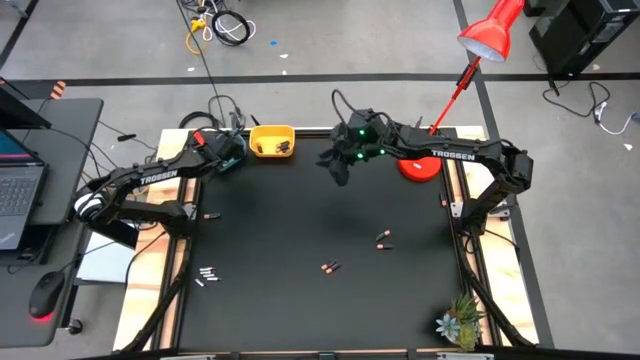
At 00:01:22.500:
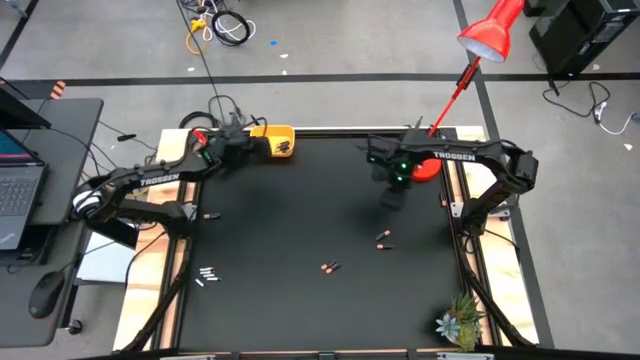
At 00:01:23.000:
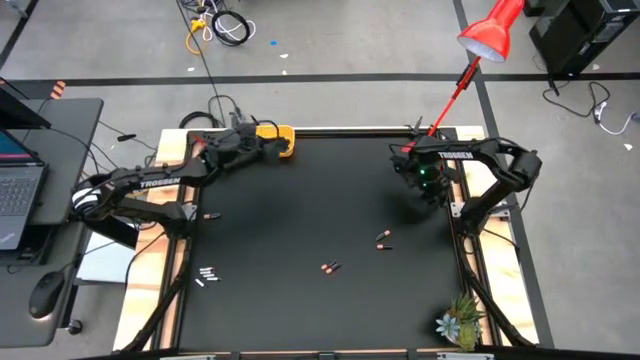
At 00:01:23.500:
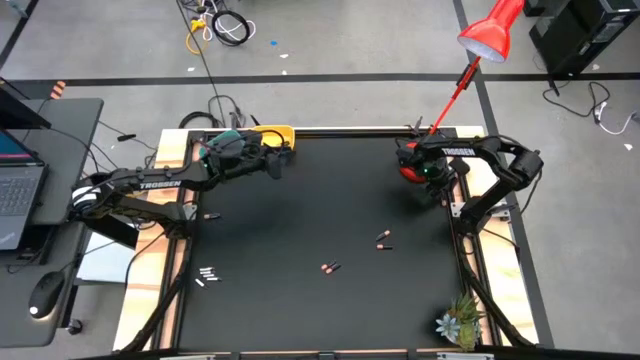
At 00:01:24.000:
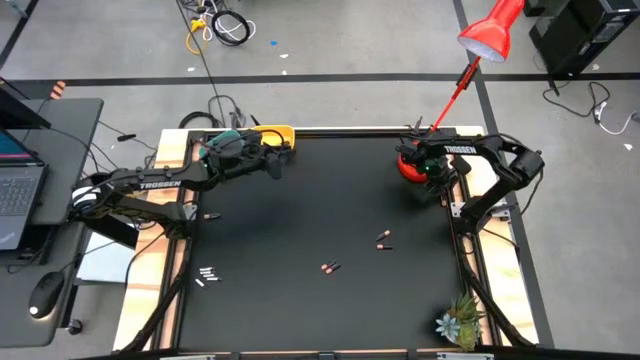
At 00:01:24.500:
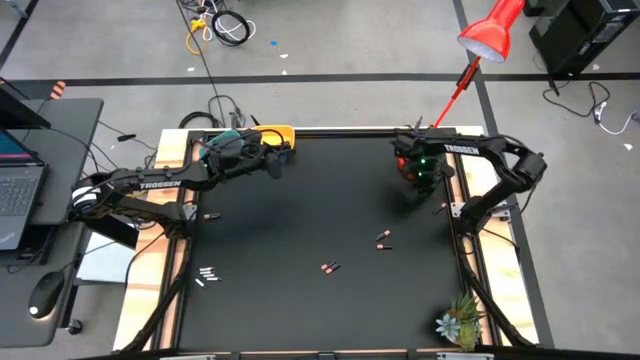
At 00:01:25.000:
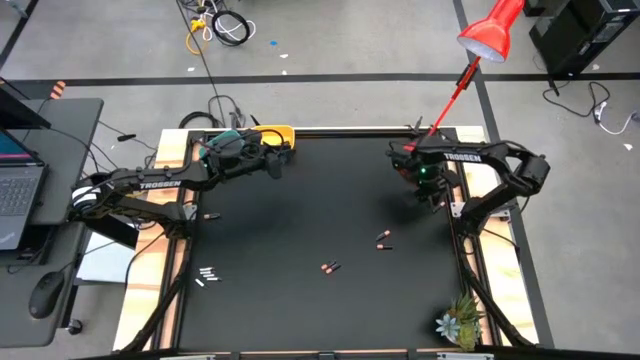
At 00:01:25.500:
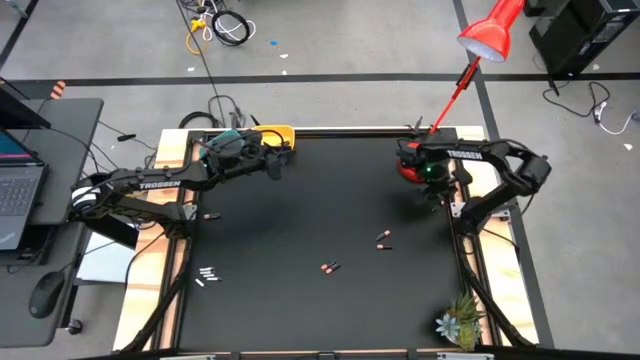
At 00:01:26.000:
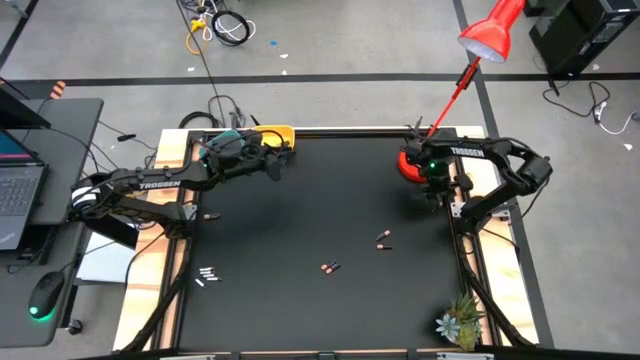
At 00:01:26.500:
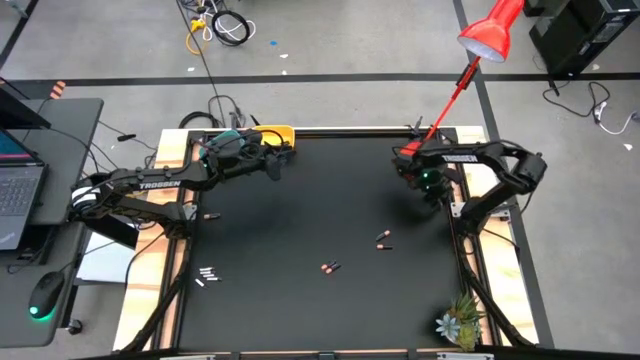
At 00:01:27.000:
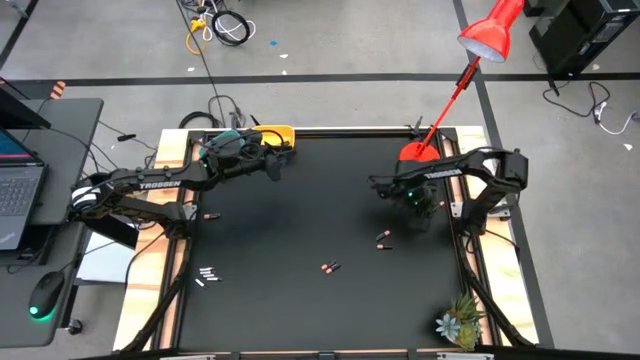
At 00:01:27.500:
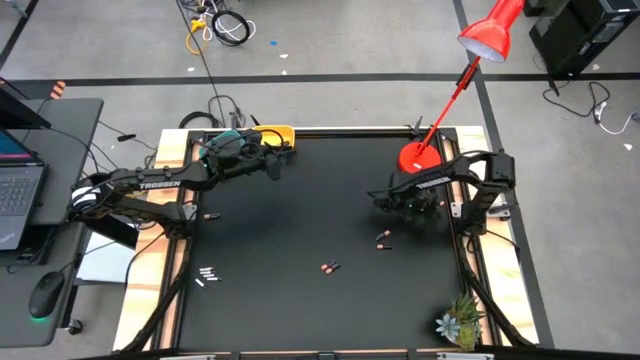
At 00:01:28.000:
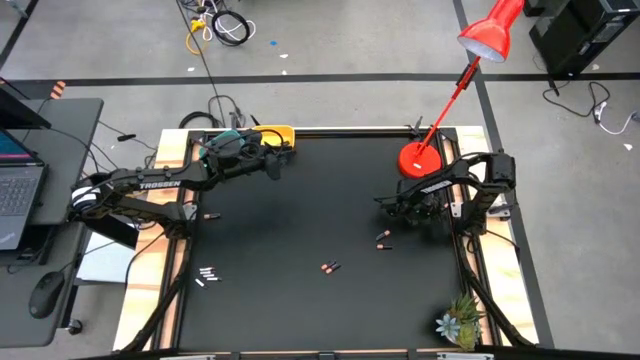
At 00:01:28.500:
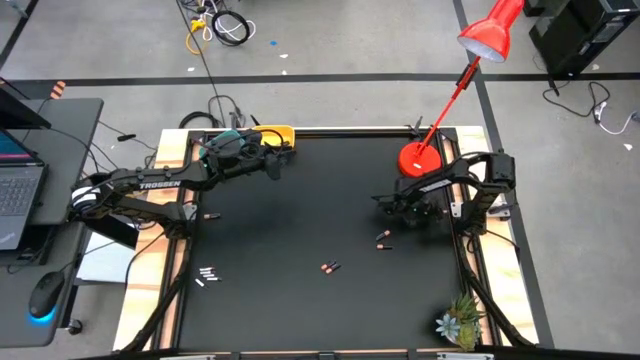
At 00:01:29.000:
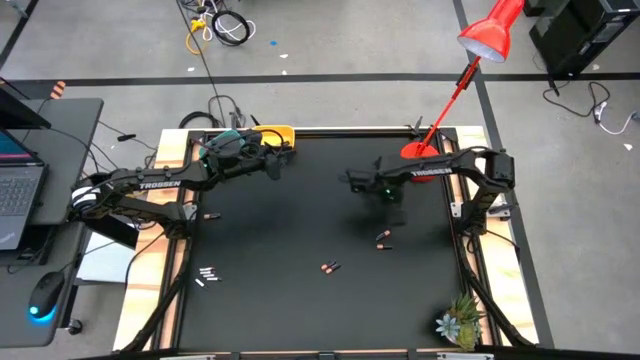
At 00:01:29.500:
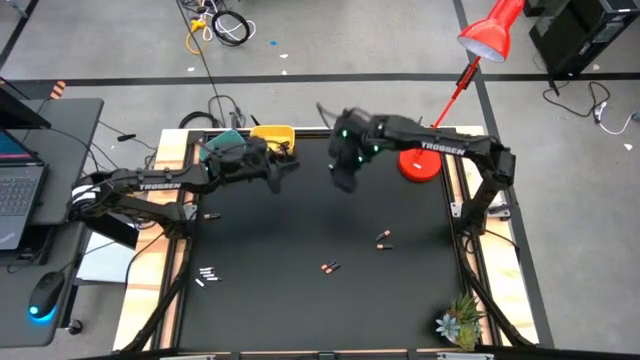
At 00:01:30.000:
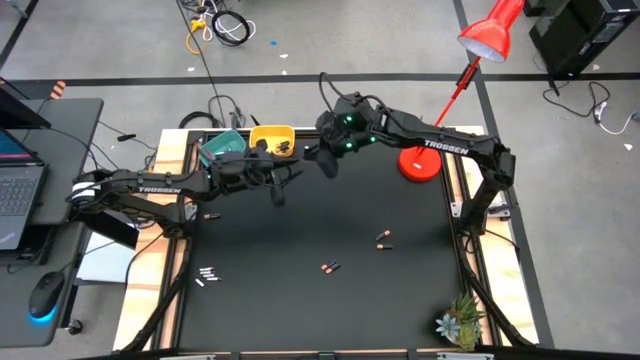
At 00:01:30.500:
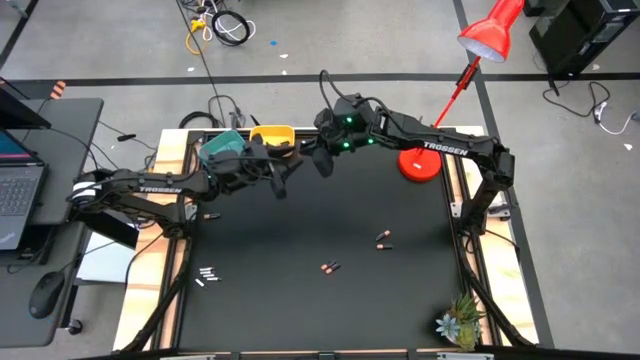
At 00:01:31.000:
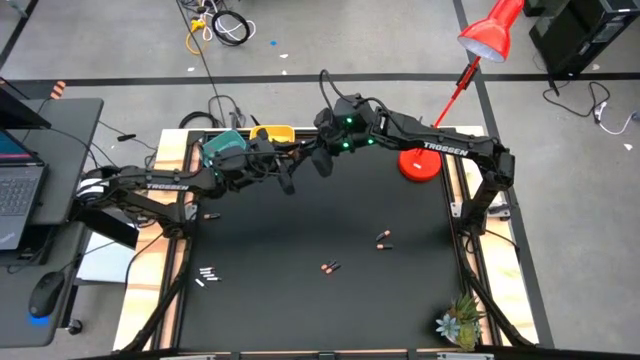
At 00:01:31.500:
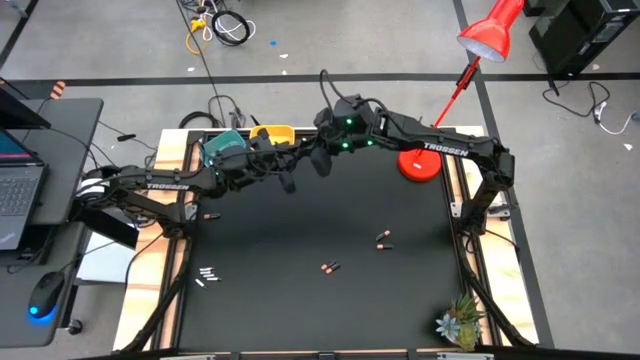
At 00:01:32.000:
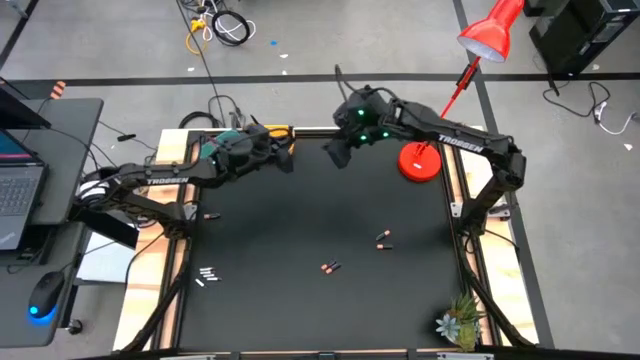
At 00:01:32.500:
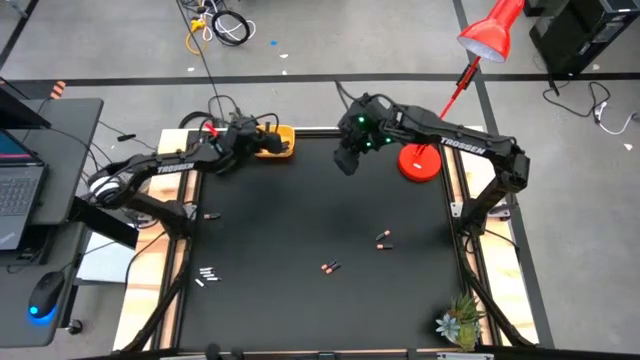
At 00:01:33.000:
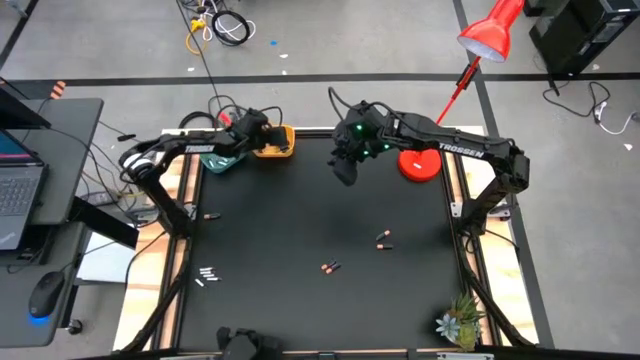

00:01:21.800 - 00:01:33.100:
Task: Sort batteries
Put the black battery into the yellow bin

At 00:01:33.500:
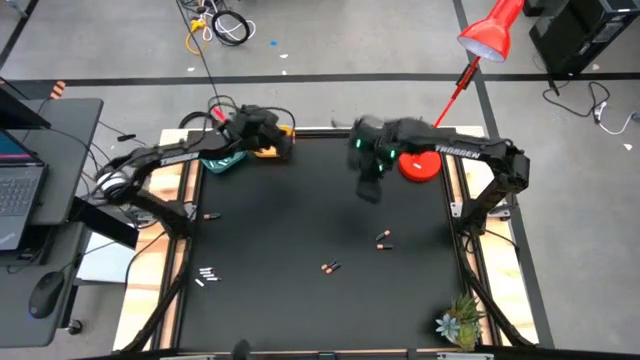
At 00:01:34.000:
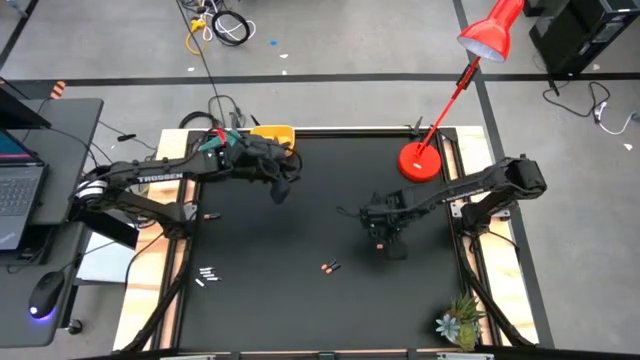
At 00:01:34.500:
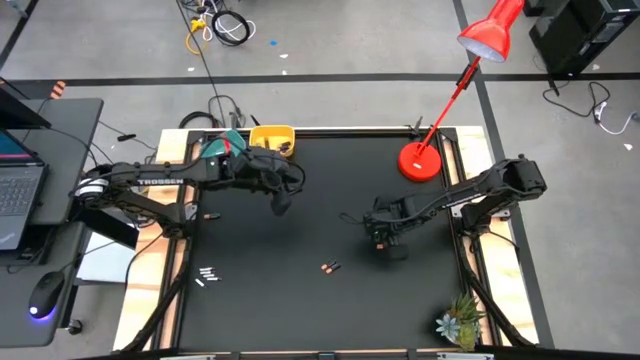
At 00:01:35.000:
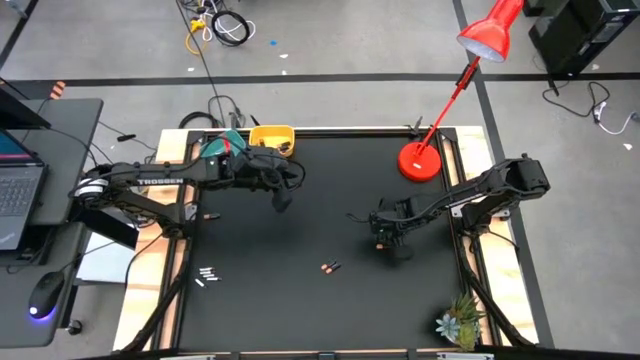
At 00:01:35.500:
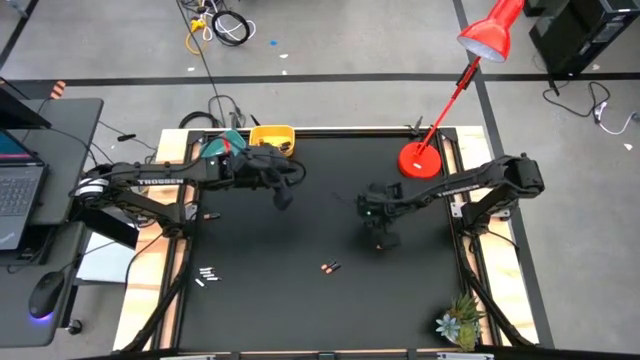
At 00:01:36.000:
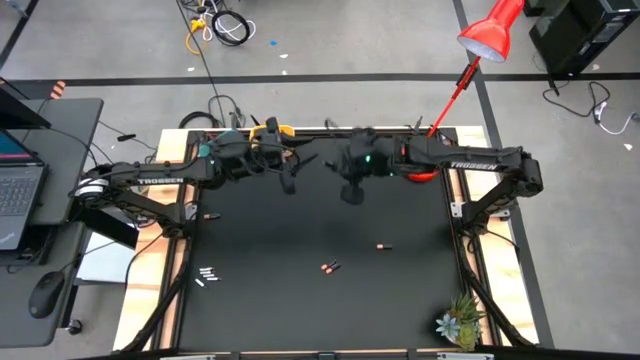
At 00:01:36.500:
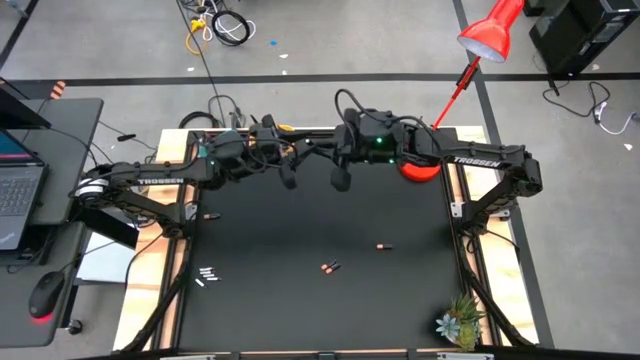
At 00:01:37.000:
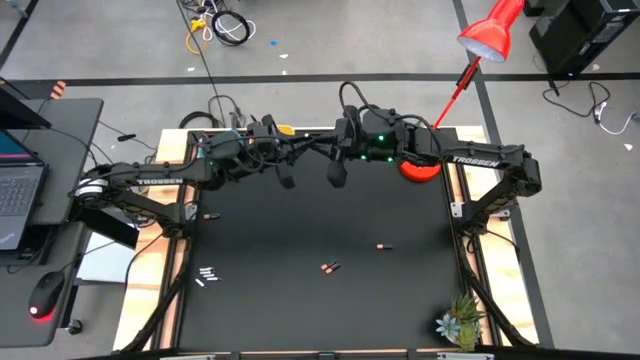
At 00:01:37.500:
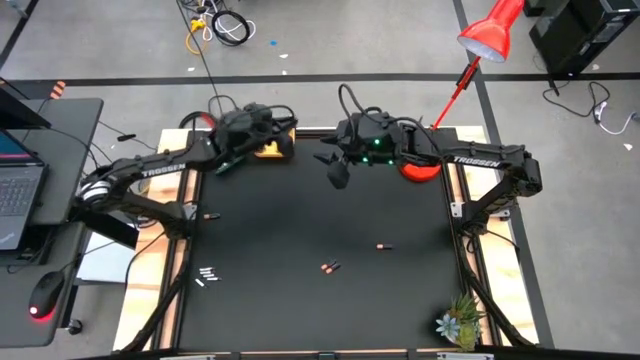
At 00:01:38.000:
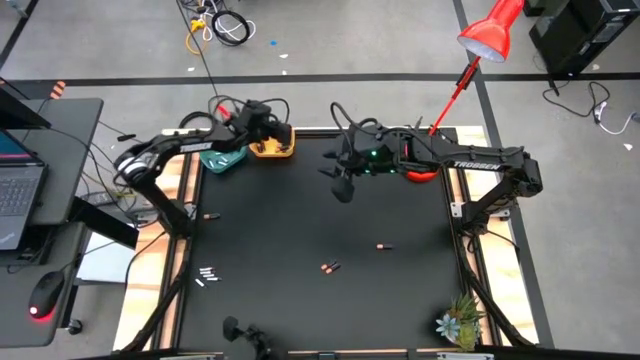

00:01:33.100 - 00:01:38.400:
Put the black battery into the yellow bin

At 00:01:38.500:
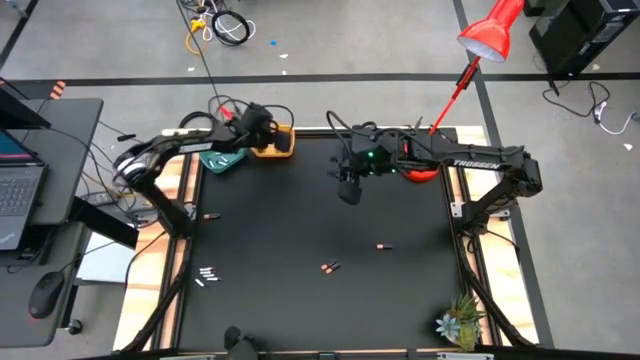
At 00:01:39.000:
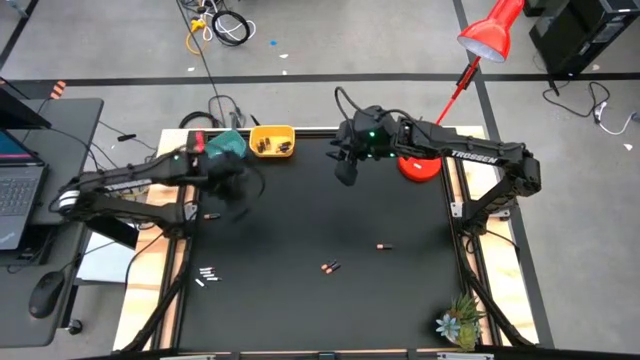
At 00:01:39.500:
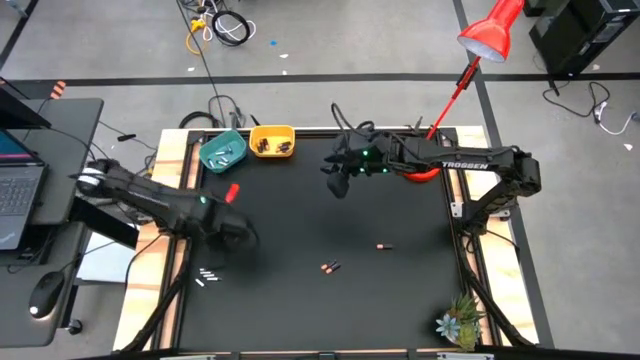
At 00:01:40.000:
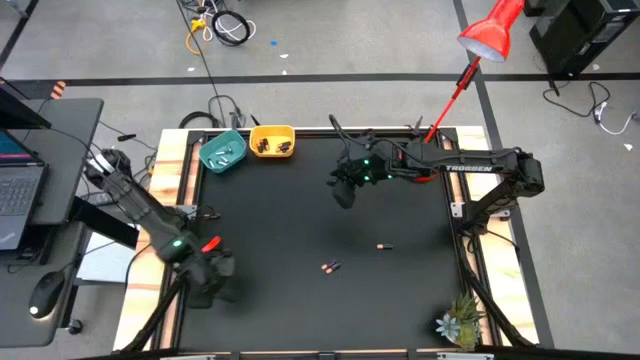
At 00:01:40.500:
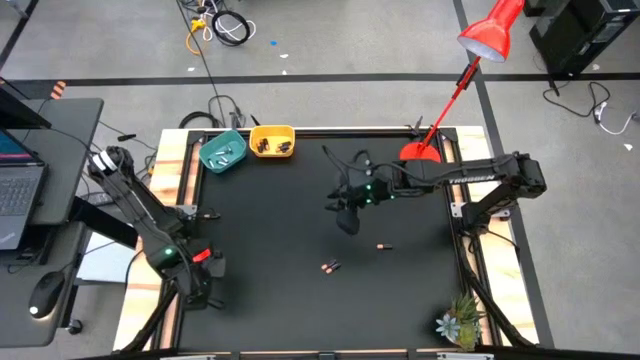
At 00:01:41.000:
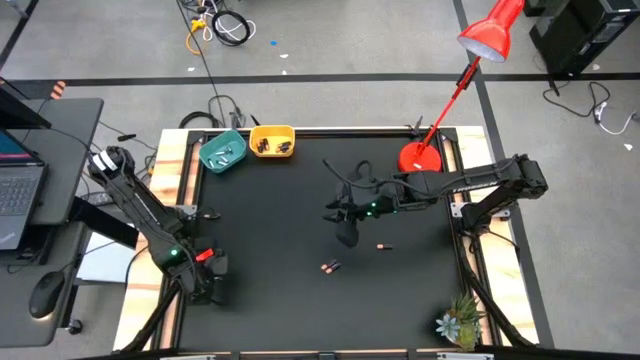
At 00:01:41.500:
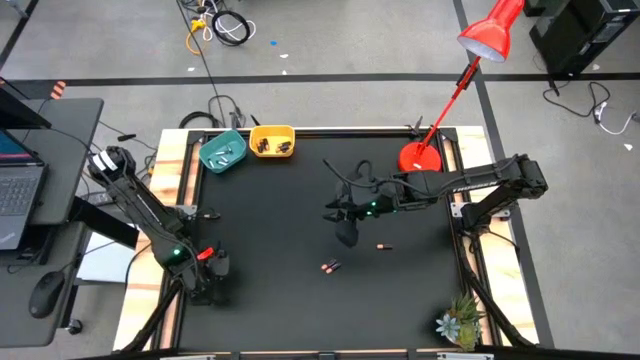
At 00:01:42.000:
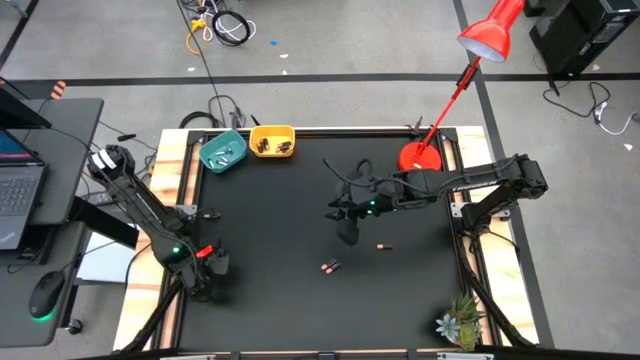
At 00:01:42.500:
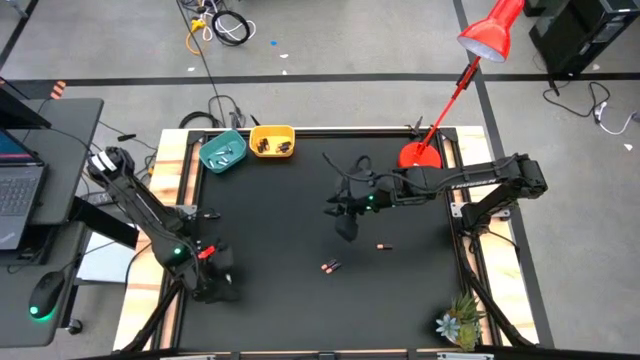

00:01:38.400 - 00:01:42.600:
Put the silver battery into the blue bin
